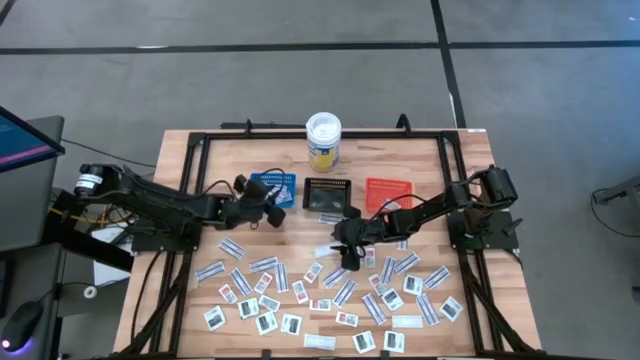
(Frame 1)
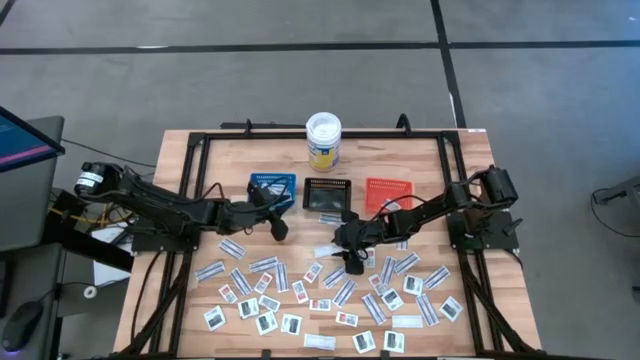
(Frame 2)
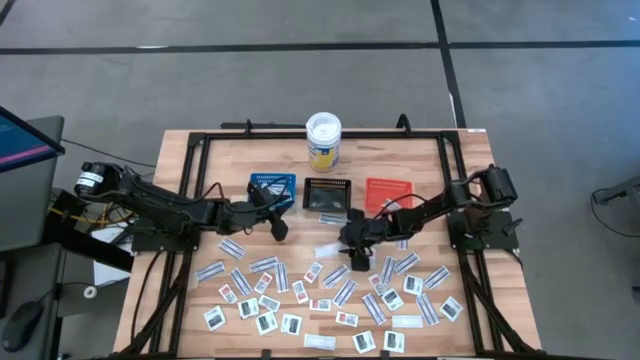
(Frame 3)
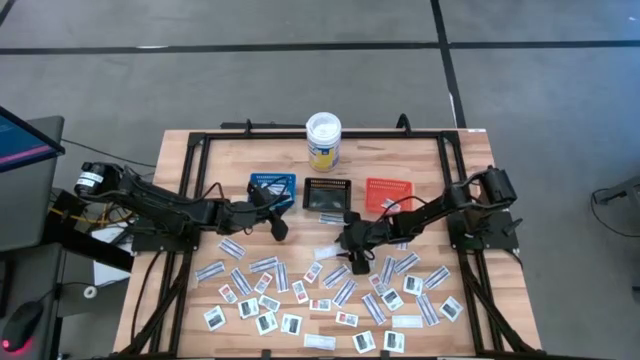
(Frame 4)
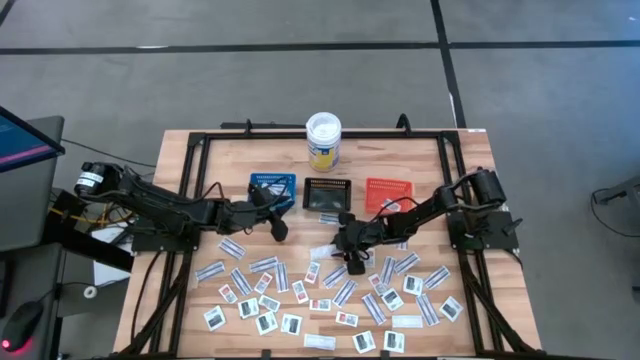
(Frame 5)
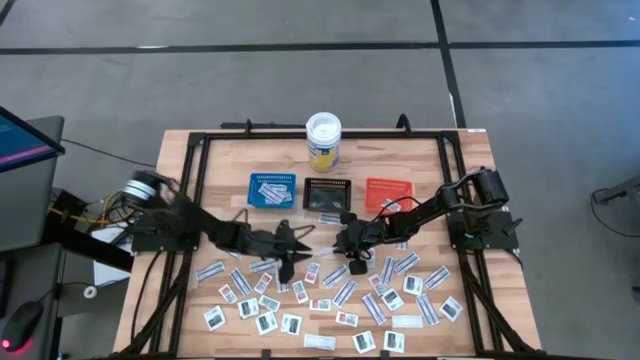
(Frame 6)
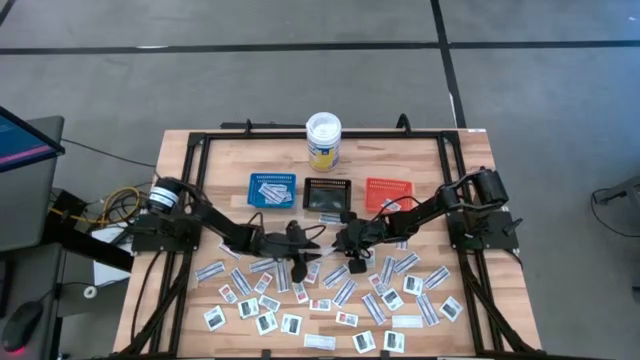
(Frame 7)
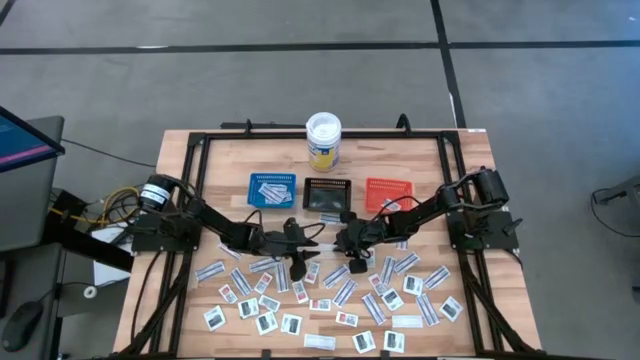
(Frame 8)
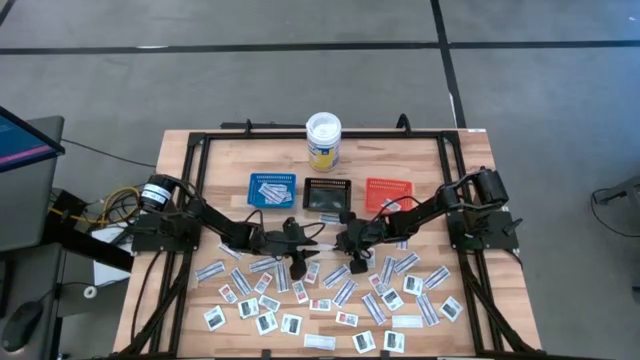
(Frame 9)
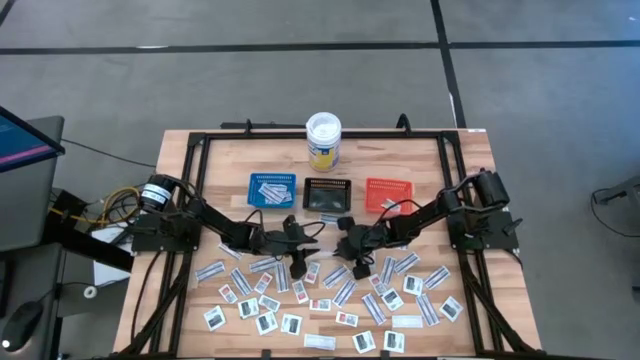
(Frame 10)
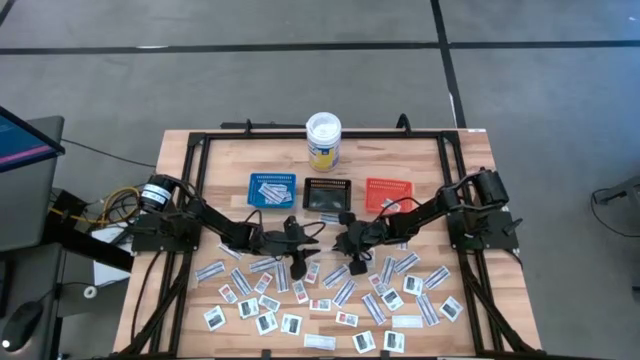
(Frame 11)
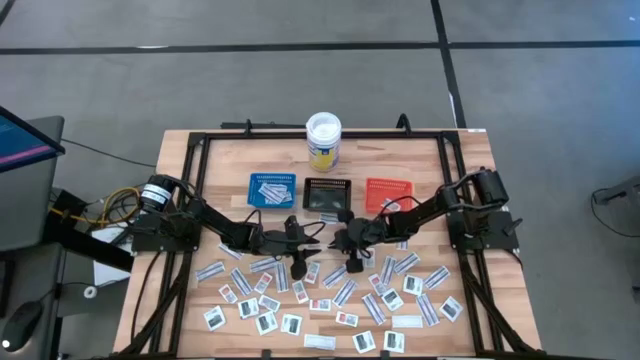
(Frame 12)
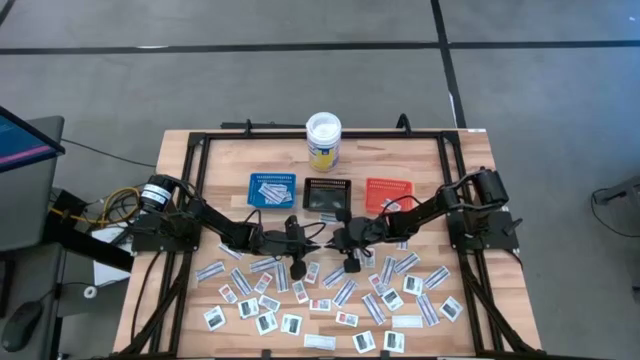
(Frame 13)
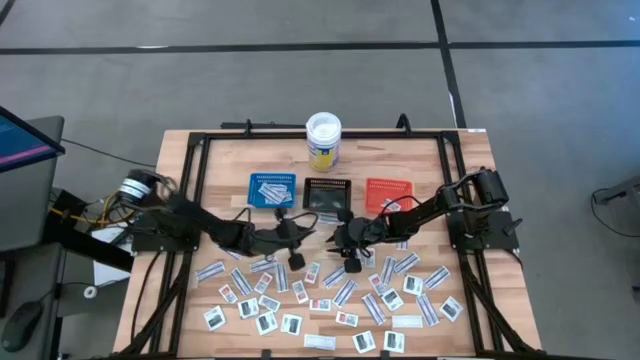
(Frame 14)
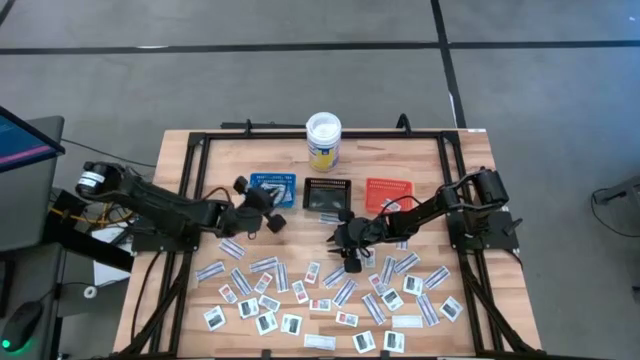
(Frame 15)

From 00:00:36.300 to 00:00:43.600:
Task: Pick & Place First Aid Supplies
Put the blue bandage into the blue bin

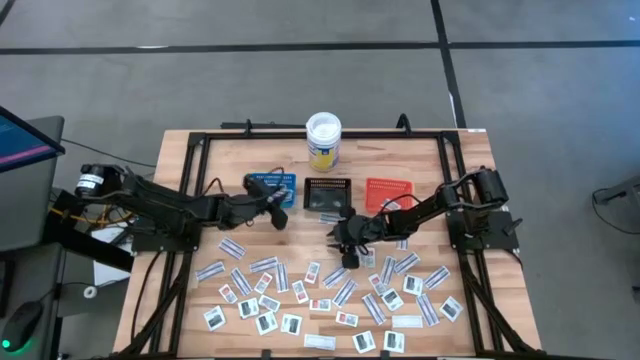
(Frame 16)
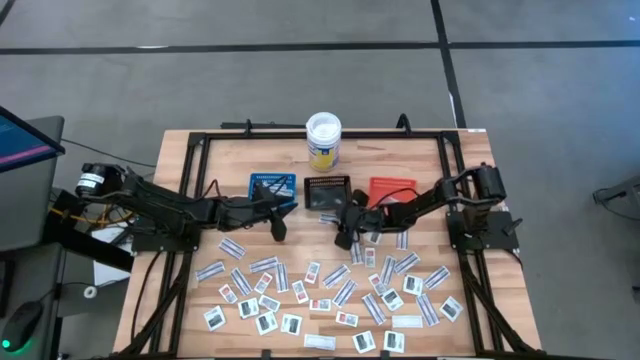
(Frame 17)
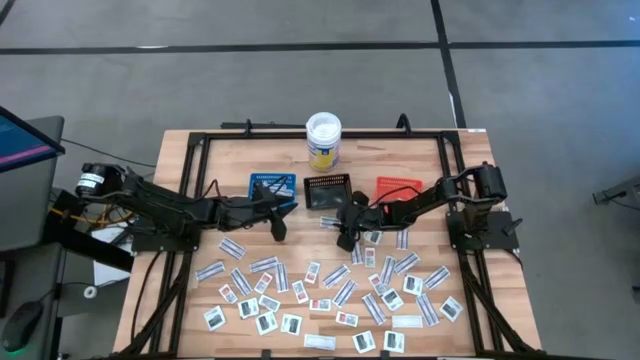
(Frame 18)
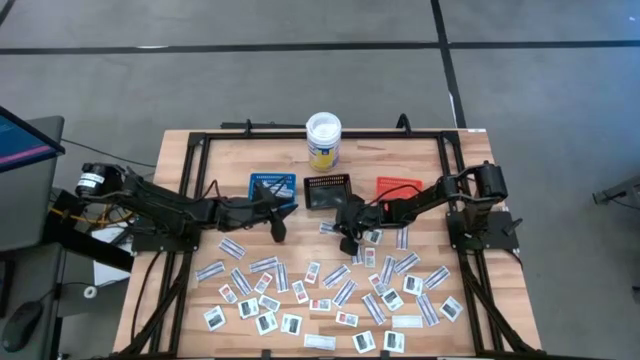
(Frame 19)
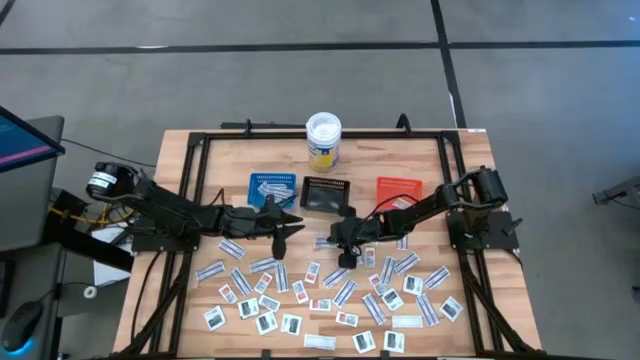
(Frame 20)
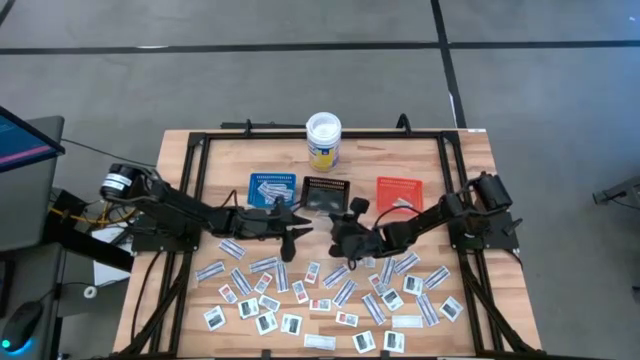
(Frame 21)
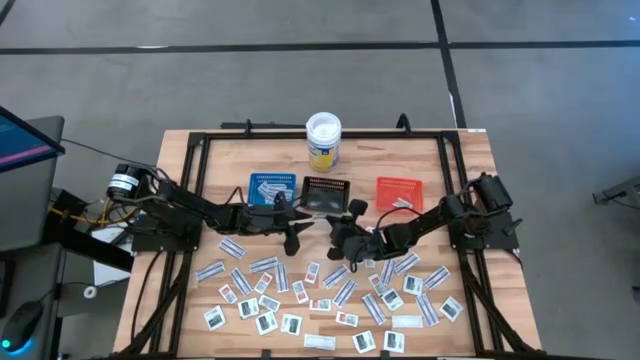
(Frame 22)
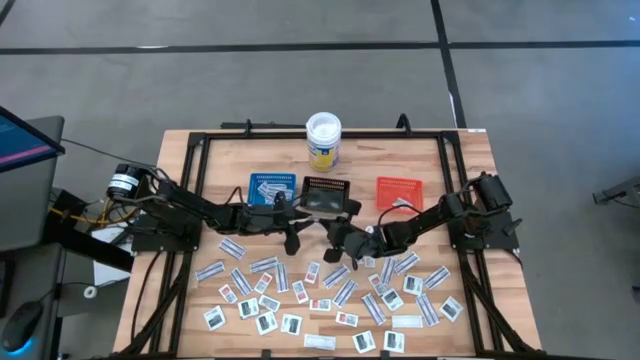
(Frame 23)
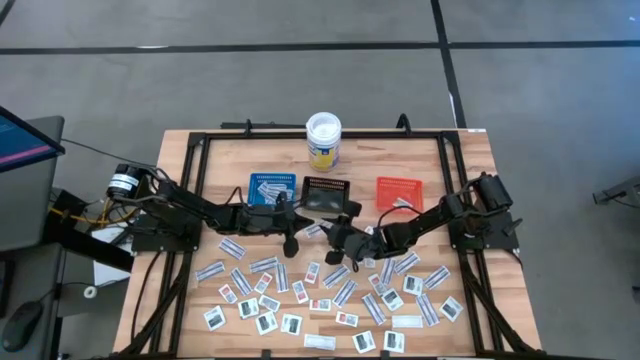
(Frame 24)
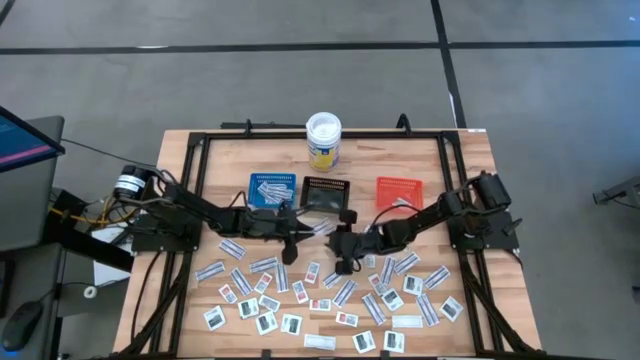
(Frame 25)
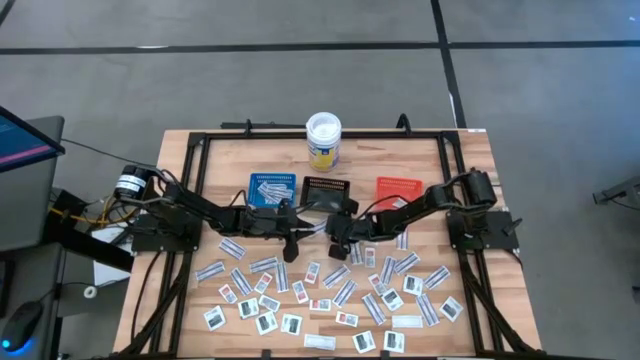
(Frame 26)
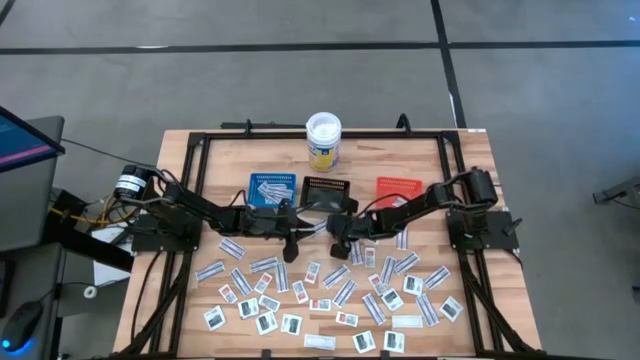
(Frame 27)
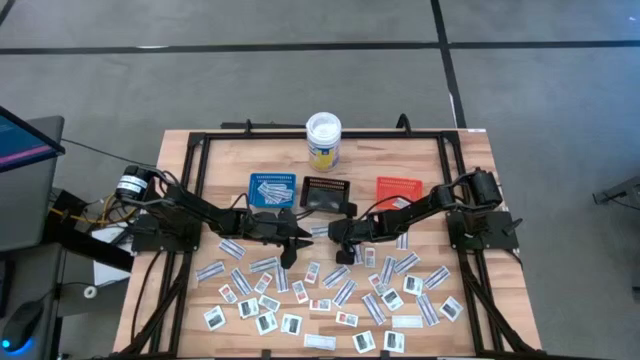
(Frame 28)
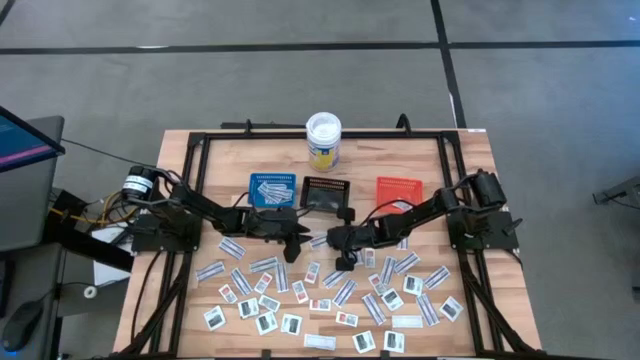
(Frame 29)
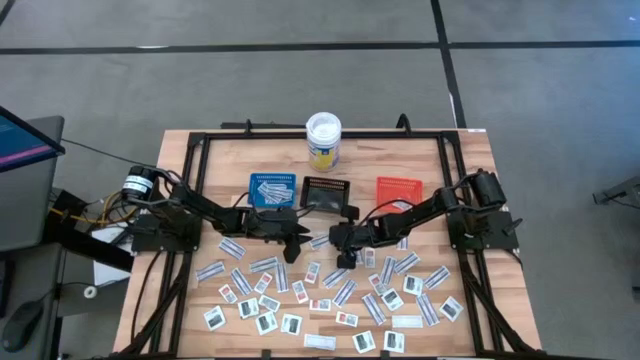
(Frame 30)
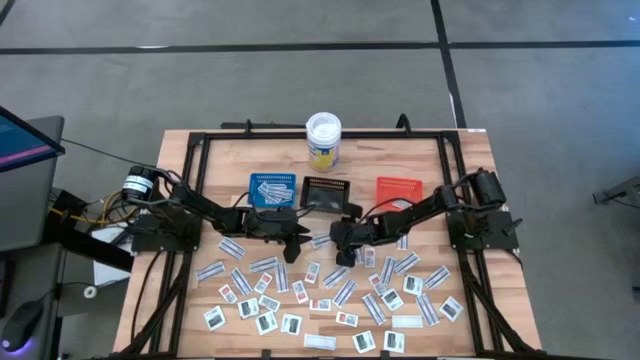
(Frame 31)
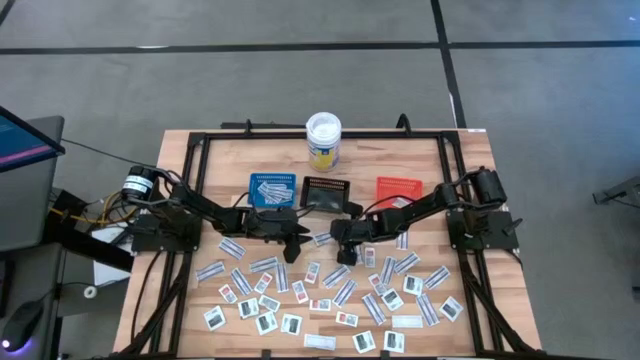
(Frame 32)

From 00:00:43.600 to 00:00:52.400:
Put the blue bandage into the blue bin

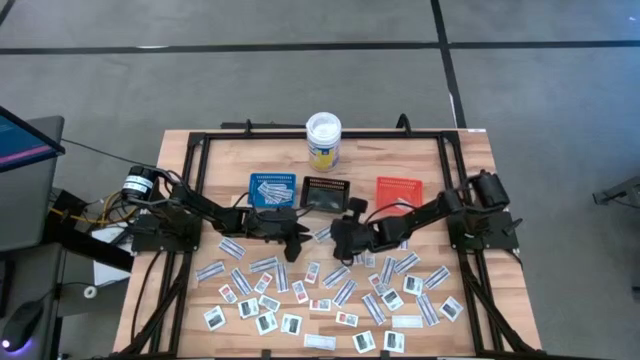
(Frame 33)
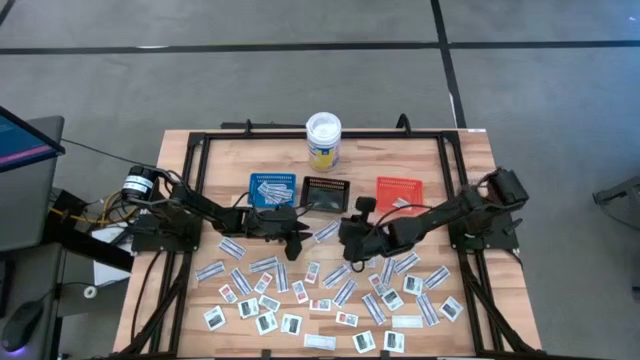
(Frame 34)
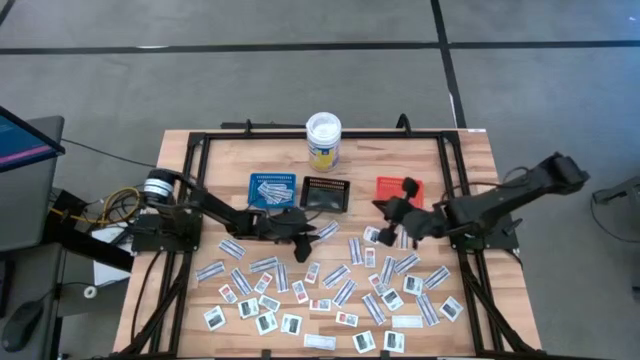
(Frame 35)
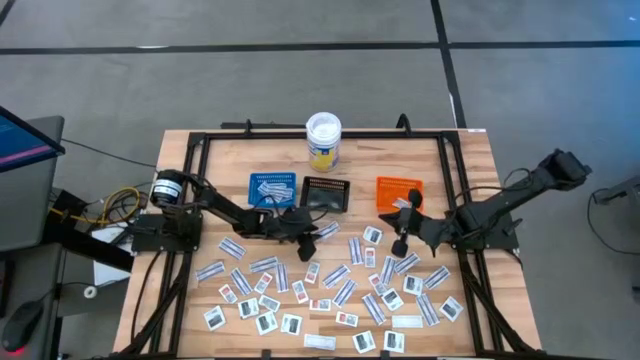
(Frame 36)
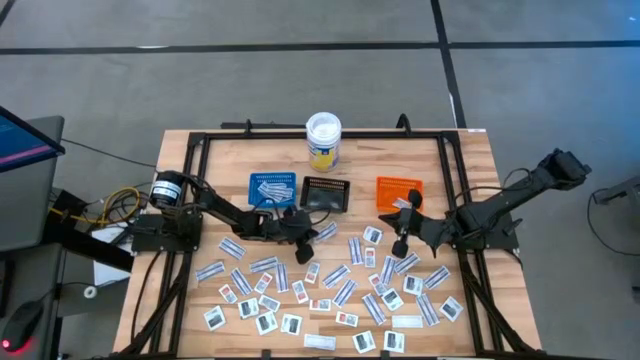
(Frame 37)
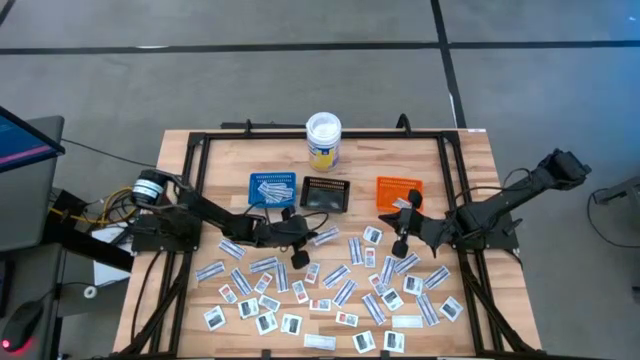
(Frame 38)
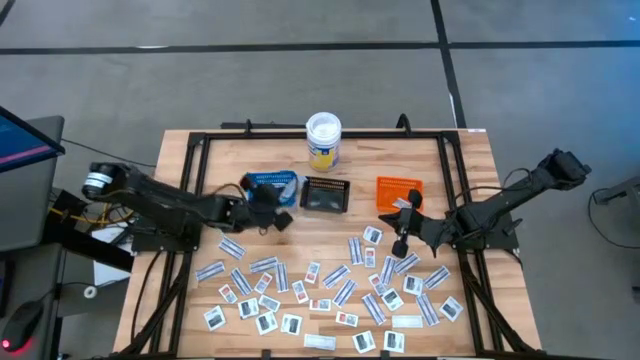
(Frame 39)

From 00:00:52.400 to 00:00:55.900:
Put the blue bandage into the blue bin

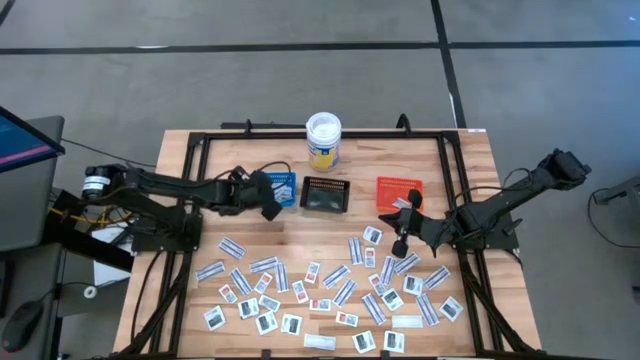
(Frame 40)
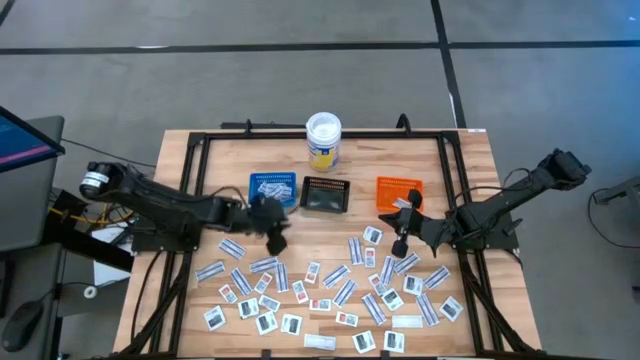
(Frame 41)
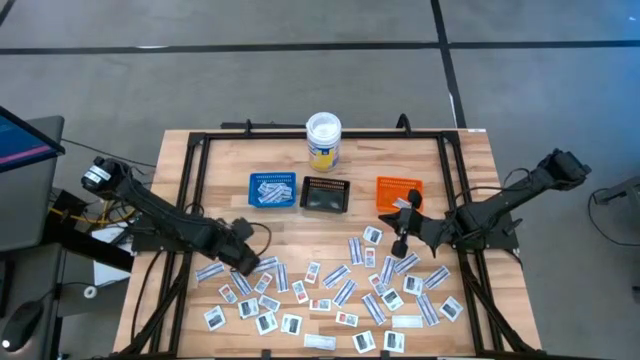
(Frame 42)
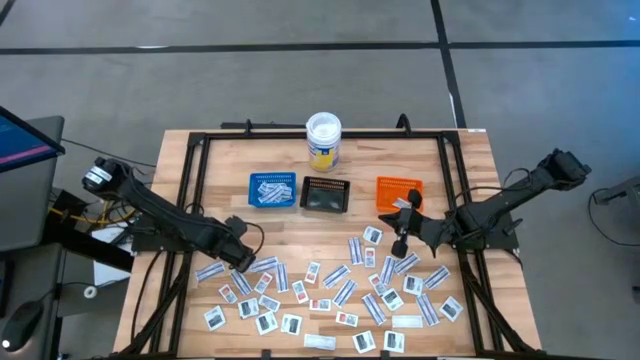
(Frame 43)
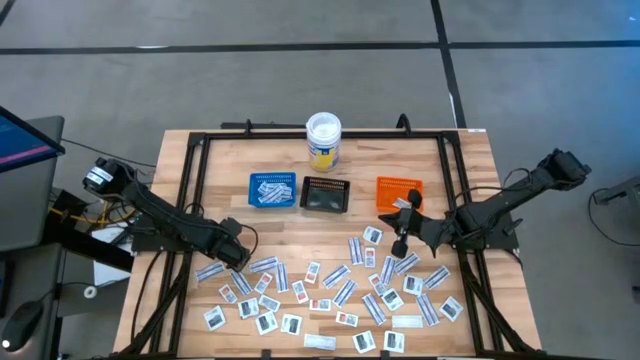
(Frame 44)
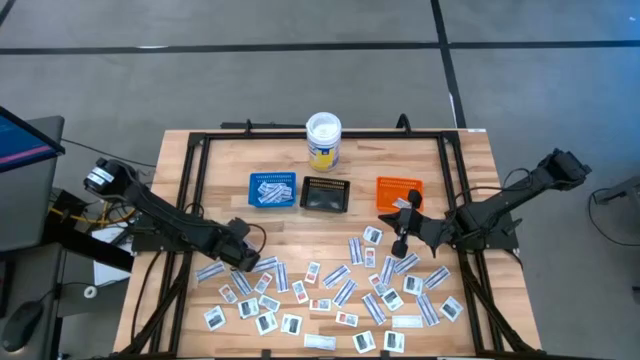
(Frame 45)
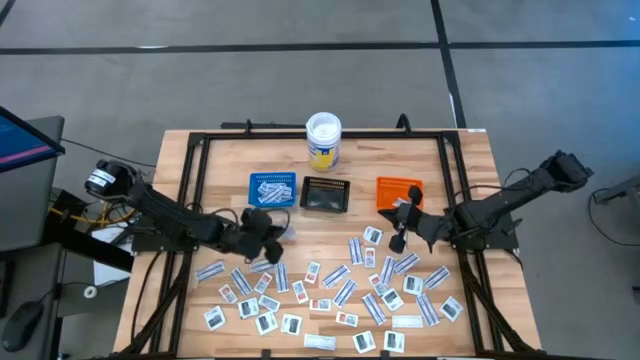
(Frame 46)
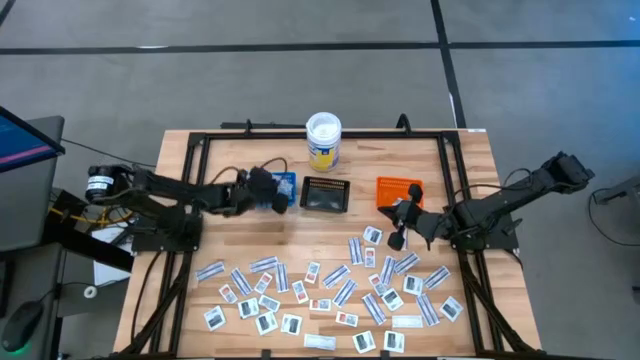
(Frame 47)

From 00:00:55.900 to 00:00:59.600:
Put the blue bandage into the blue bin
